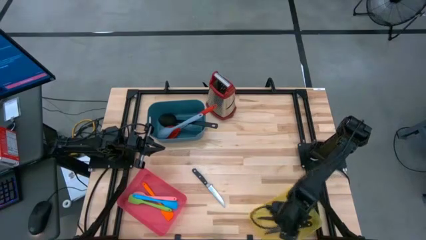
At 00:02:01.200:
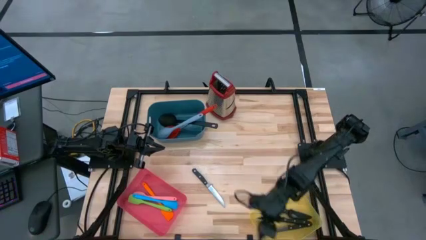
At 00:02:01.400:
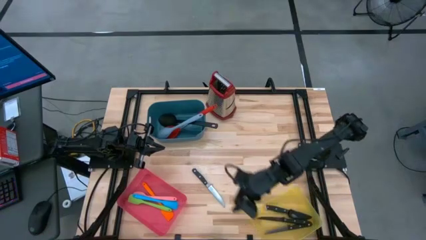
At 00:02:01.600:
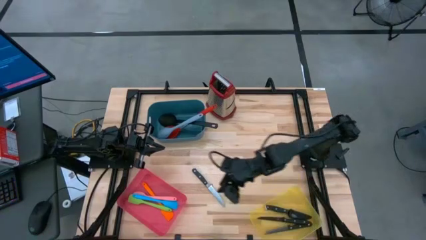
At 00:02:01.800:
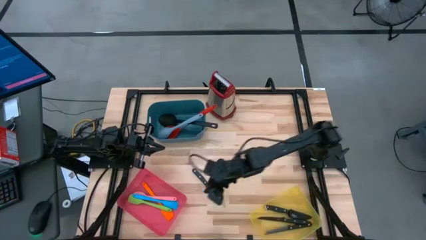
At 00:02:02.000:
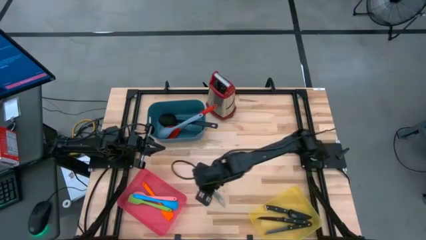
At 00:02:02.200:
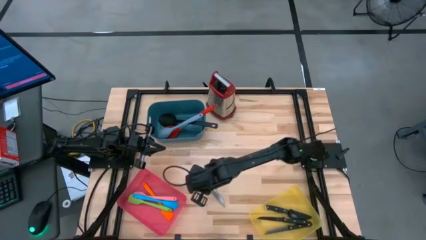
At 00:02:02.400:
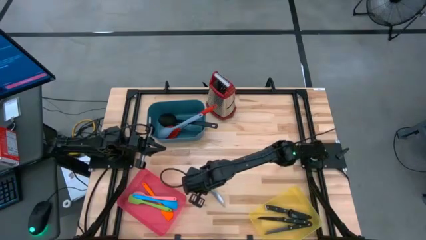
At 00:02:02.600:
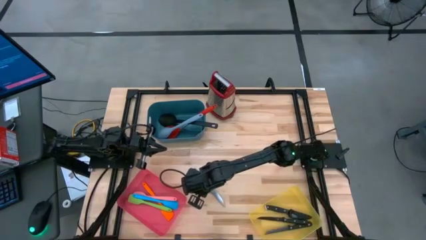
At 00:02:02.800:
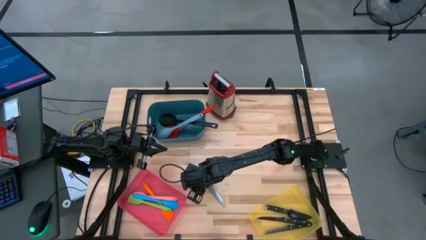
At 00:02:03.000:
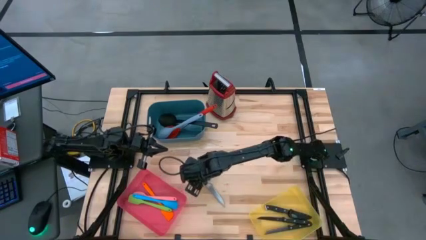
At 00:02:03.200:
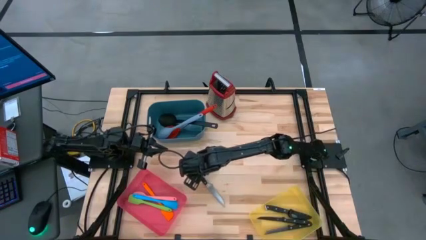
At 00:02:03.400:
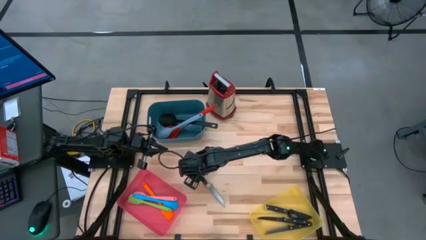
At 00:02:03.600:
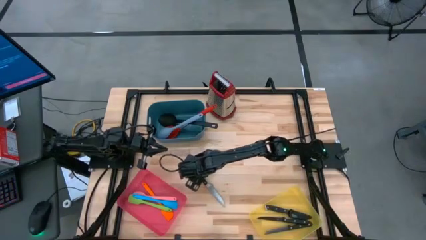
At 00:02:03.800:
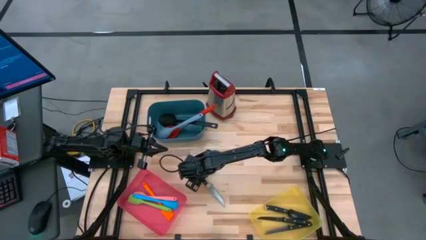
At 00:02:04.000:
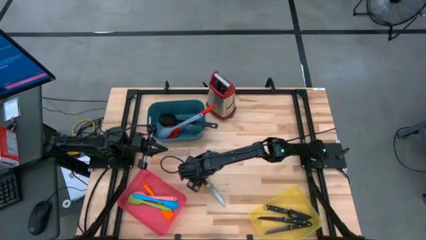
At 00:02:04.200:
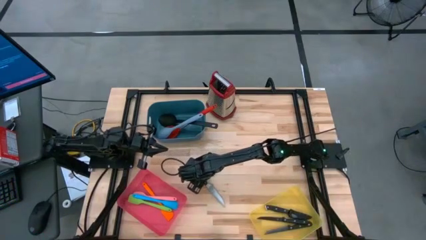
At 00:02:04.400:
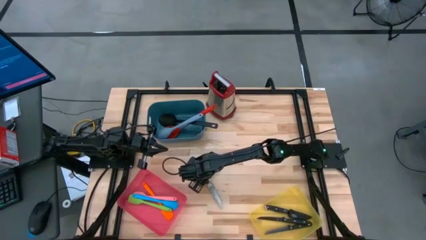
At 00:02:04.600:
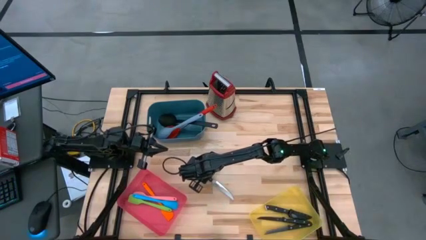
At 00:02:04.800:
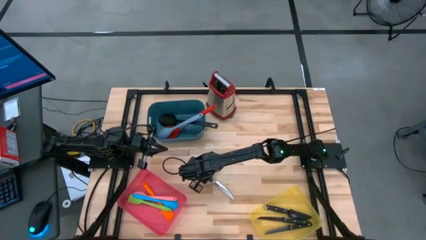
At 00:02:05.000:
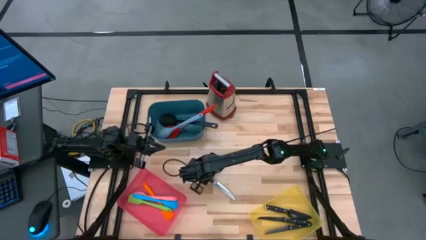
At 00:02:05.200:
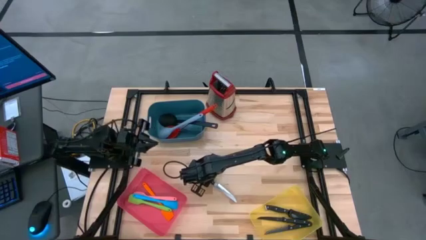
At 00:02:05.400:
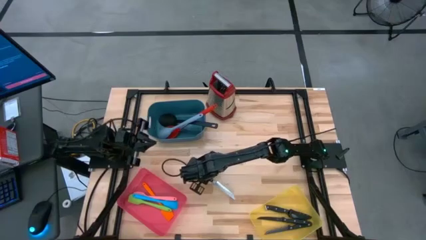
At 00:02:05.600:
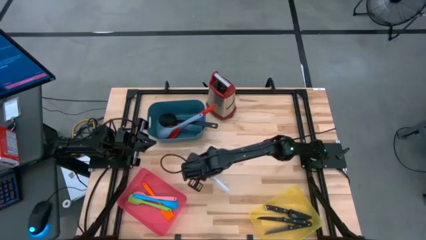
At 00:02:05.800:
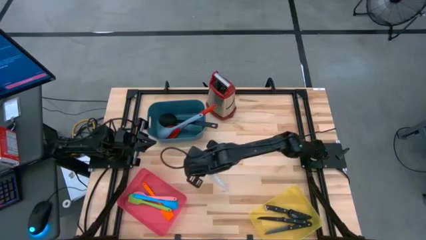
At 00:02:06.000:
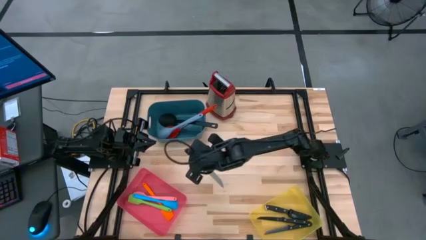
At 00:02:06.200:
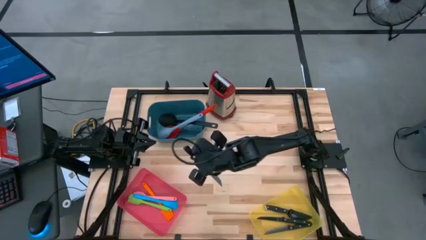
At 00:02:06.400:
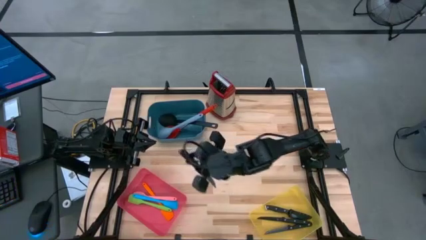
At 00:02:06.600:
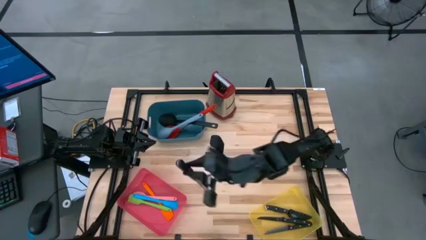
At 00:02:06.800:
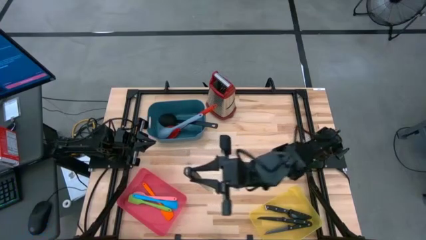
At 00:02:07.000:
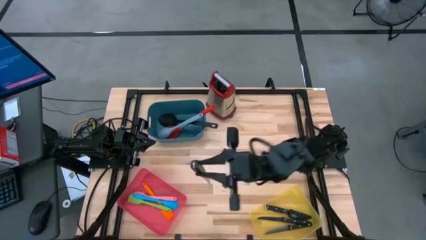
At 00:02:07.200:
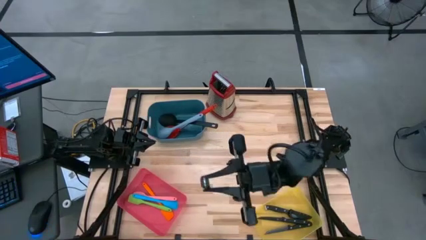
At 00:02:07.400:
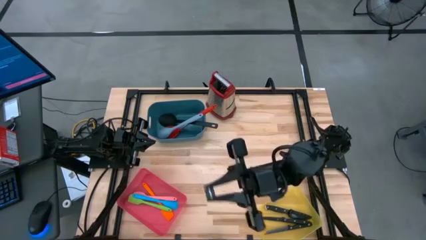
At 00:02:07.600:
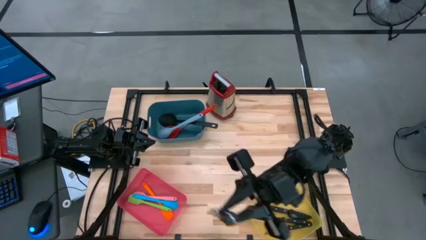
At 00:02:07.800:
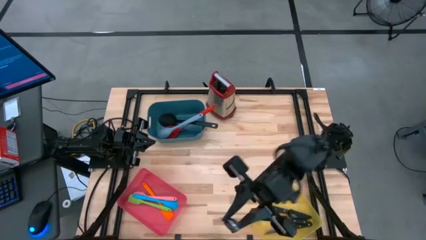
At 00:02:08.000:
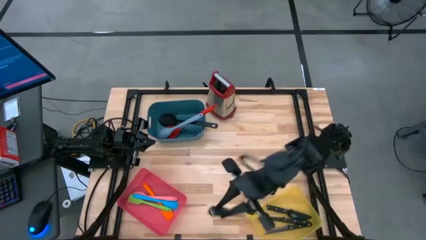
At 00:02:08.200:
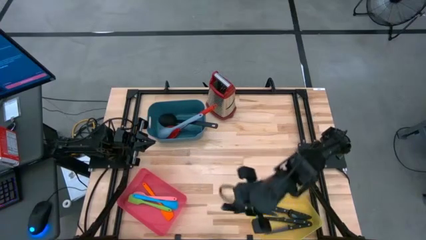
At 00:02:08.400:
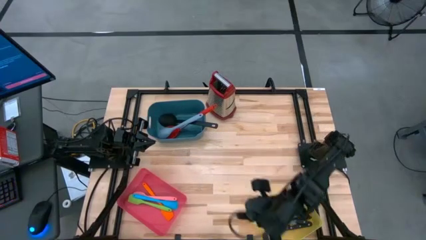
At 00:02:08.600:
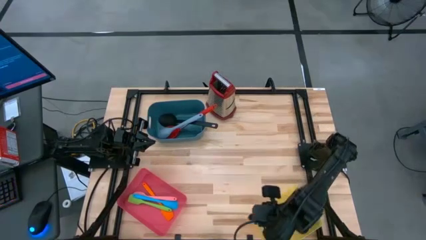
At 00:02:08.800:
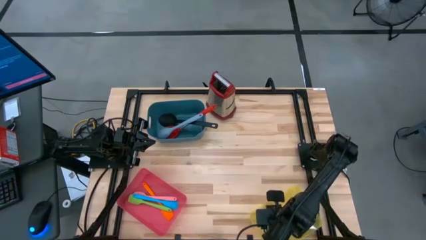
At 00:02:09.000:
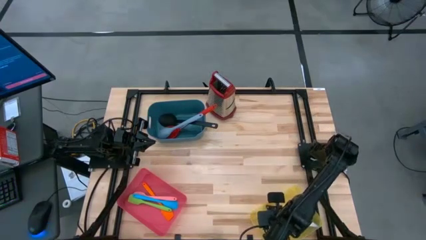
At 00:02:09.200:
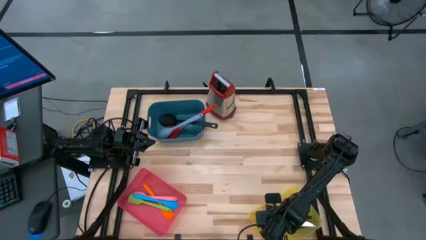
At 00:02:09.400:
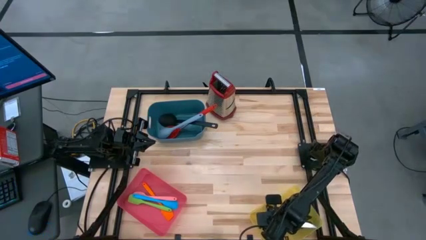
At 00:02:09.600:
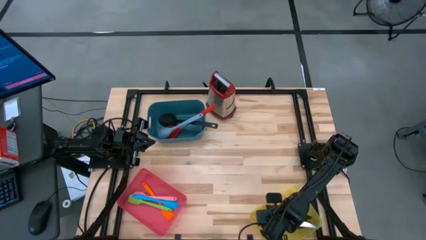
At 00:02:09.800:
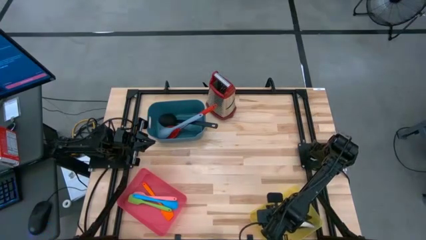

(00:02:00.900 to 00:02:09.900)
Task: Pick & Place Kitchen Items
Put the silver table knife into the yellow bin

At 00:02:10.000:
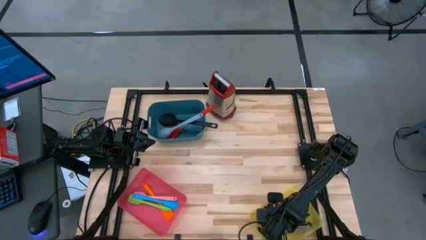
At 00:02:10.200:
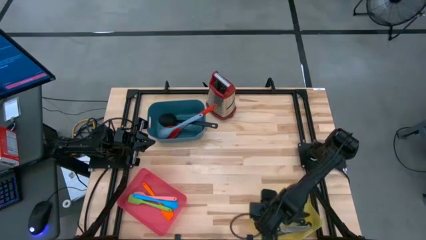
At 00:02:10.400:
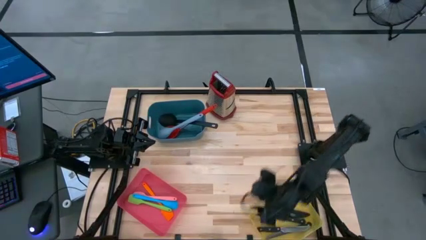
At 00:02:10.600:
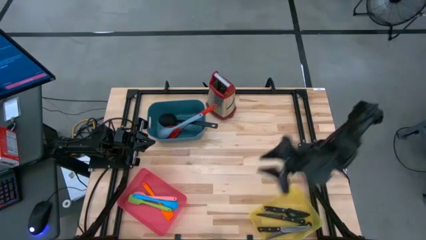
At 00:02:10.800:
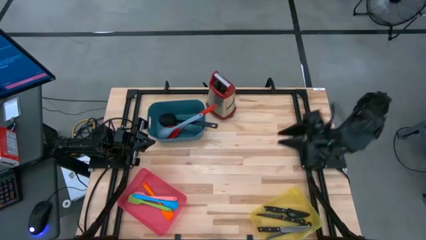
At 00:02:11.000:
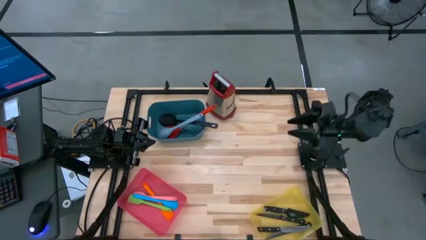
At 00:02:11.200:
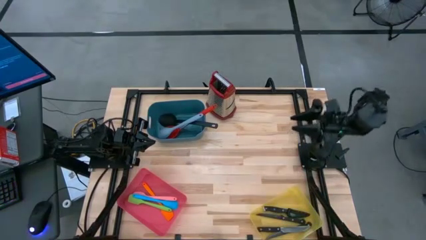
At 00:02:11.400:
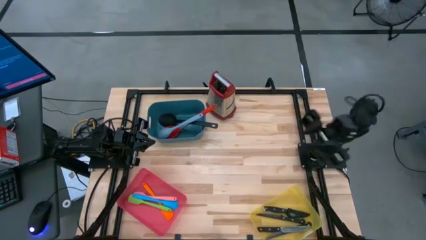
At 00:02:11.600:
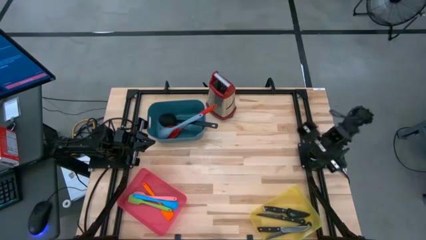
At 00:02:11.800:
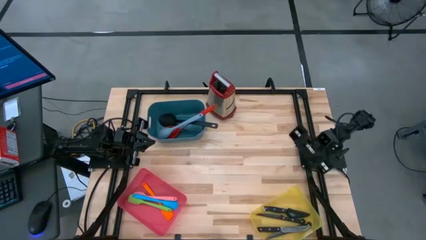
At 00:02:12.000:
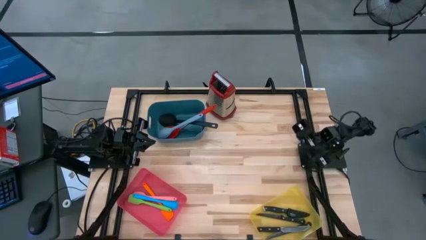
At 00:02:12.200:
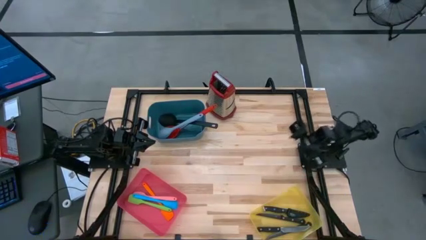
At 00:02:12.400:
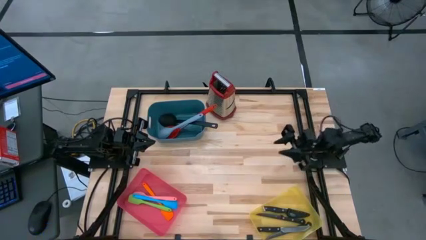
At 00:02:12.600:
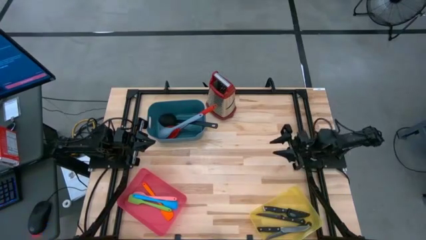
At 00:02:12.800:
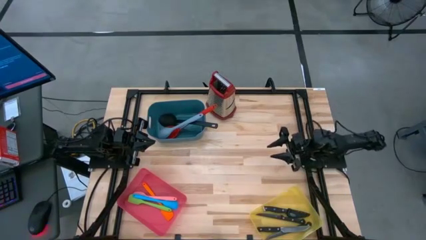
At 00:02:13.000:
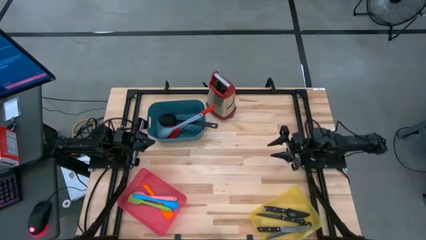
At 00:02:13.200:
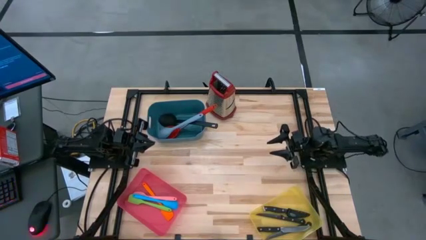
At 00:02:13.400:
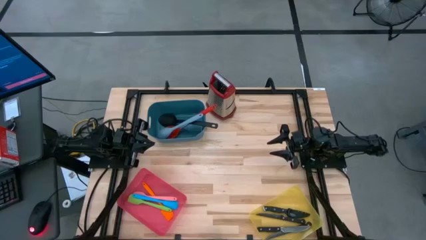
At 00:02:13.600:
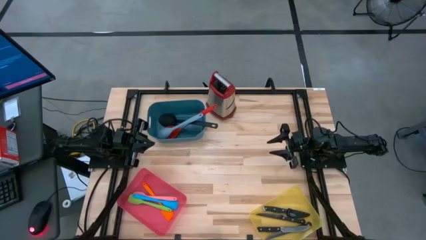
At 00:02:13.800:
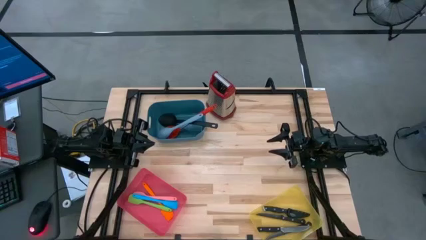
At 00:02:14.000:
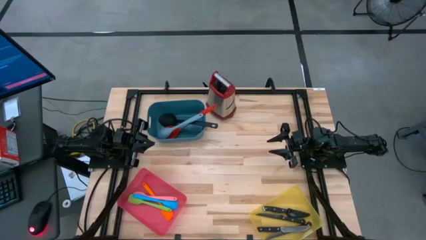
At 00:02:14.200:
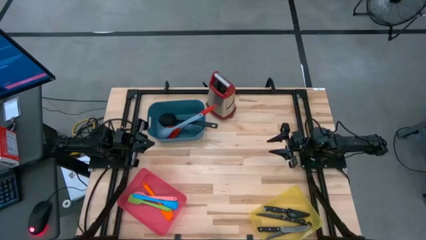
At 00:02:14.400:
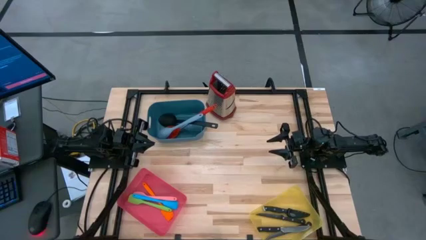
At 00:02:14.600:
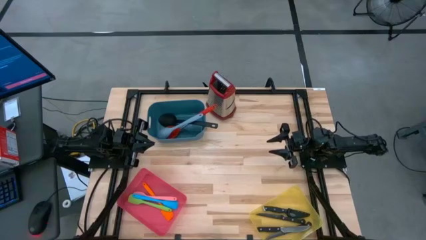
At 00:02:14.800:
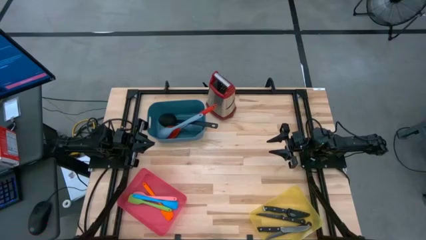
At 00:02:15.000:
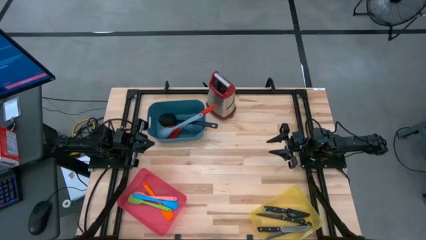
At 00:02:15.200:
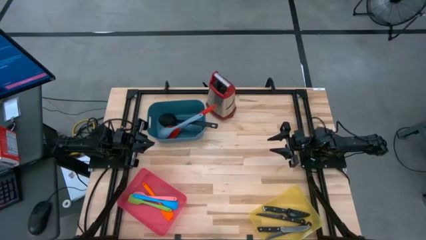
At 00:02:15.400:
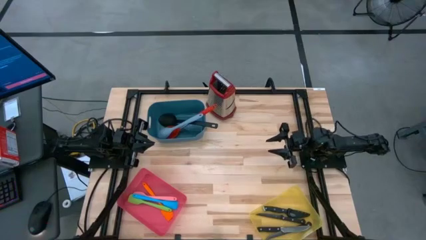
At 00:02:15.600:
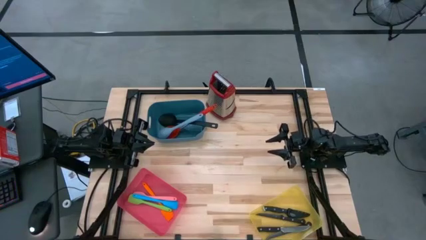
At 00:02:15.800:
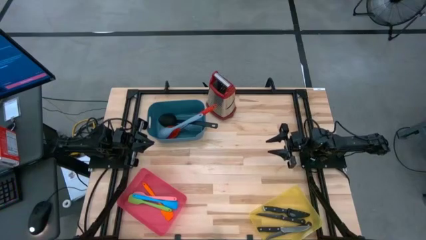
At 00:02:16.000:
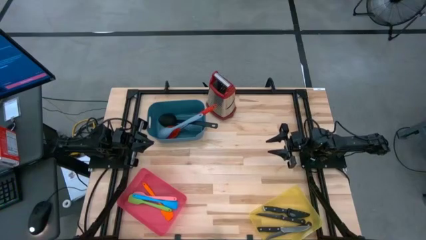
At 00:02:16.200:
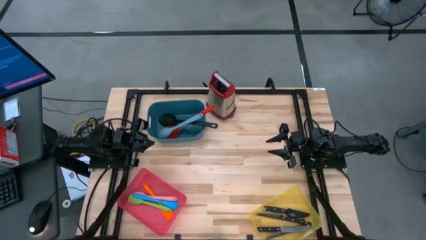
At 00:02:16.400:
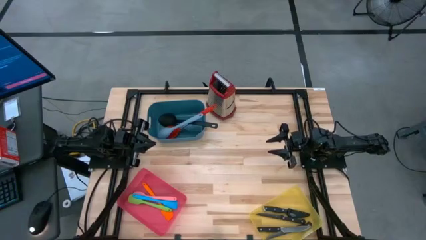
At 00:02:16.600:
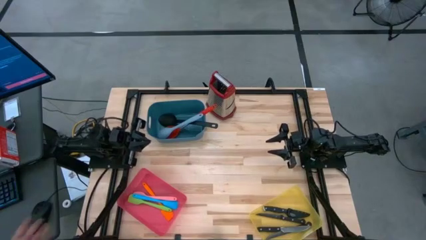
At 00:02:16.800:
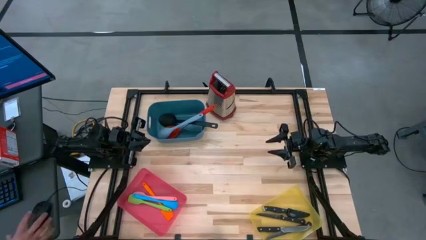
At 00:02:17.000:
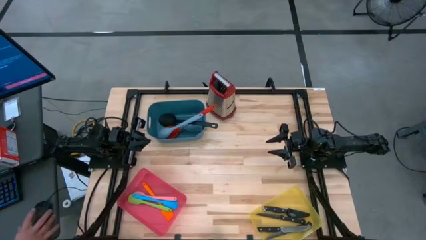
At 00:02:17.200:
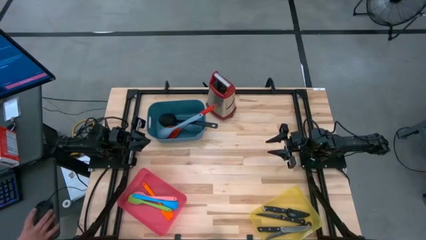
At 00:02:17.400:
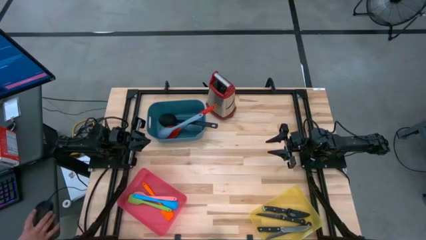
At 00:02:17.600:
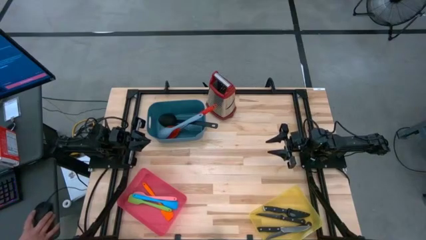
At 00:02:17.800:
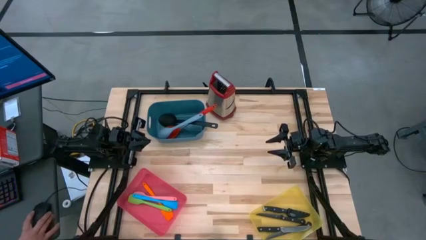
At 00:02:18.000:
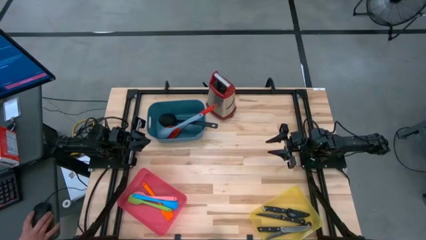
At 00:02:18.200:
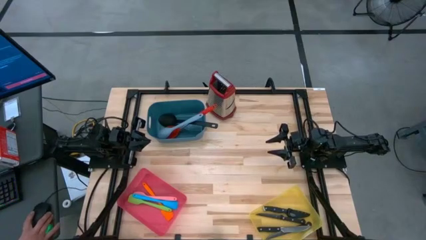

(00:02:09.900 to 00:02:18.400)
Return to Home Position
